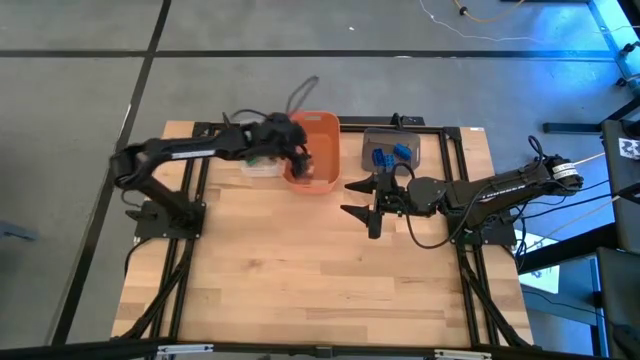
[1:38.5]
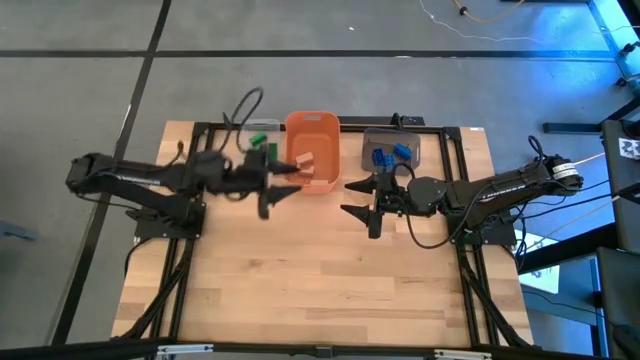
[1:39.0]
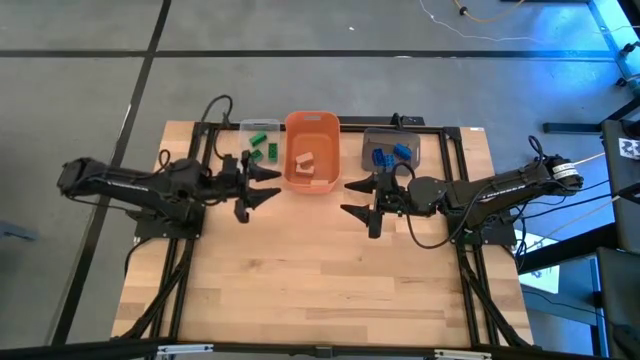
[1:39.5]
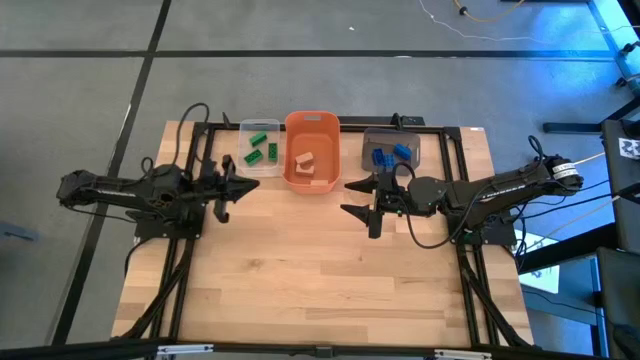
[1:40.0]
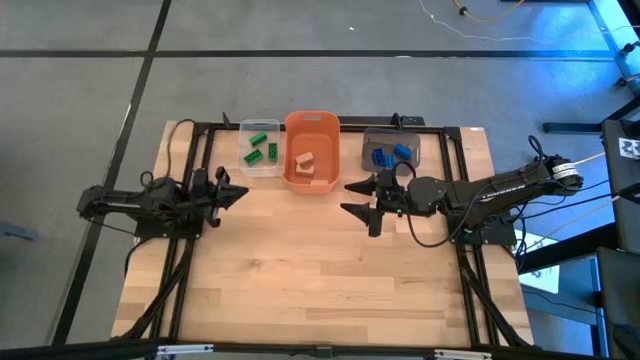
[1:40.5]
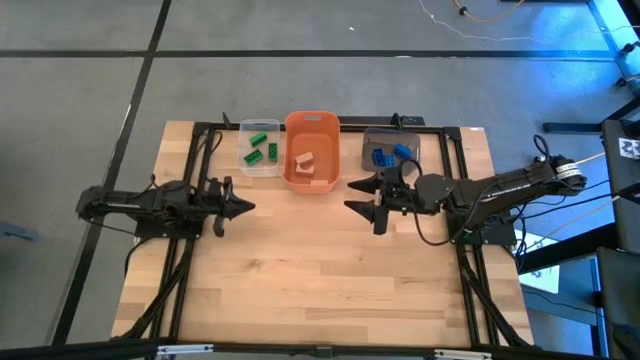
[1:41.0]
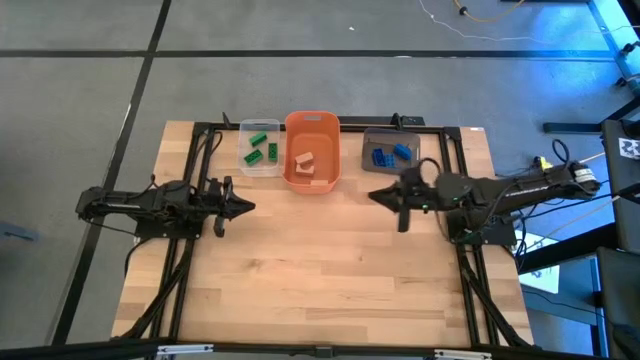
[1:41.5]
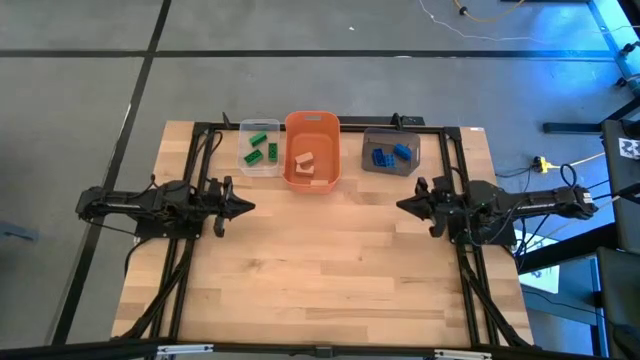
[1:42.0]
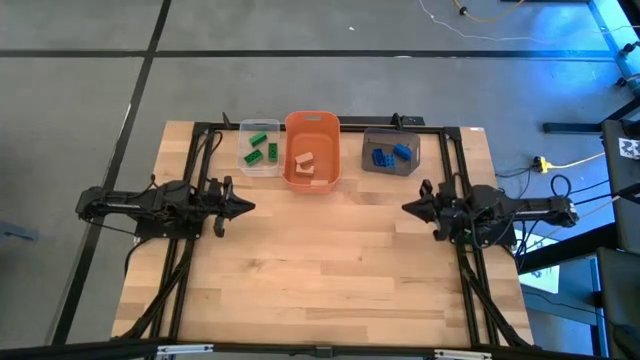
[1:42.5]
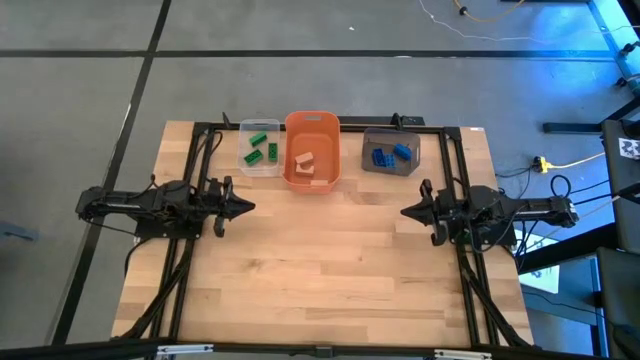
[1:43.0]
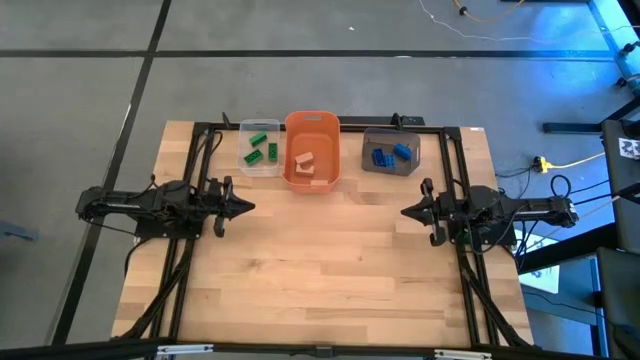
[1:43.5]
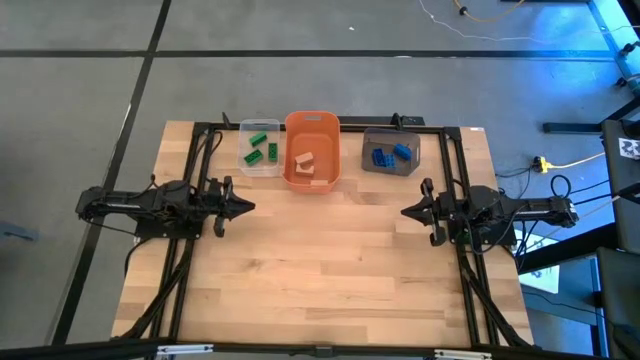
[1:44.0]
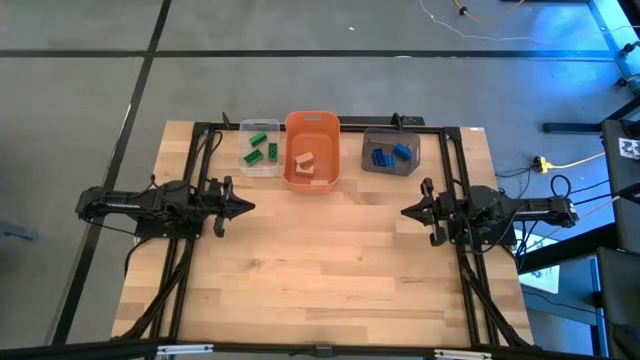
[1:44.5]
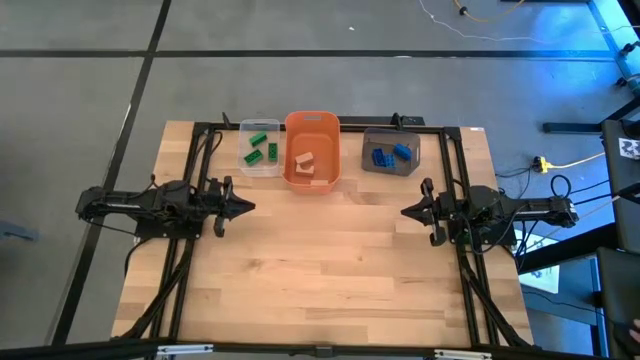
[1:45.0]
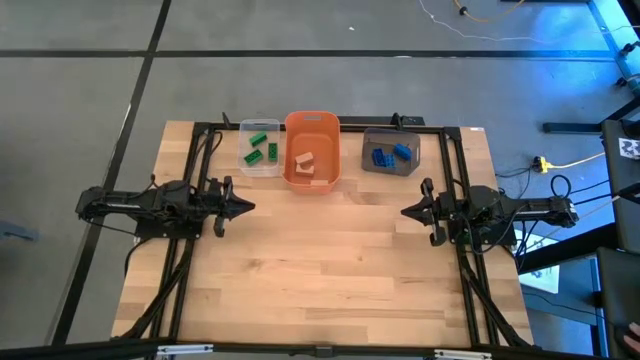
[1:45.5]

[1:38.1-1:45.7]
Task: Sort & place blocks by color
Return to Home Position

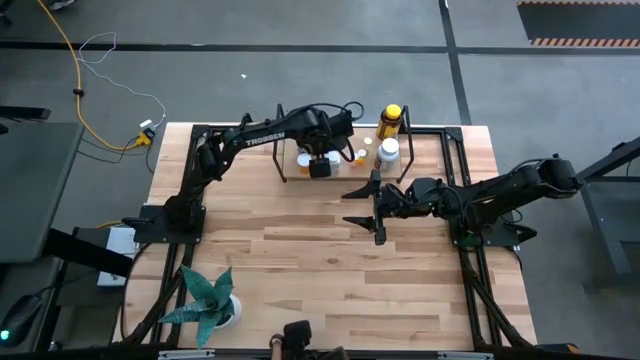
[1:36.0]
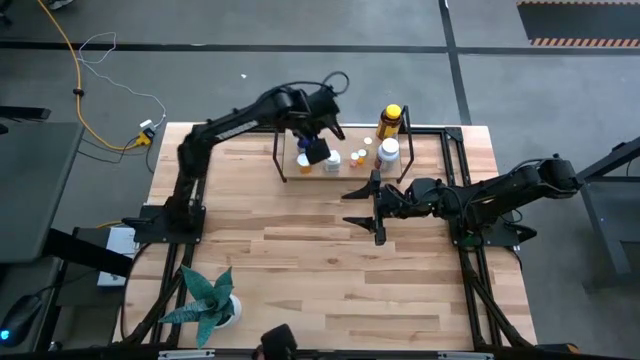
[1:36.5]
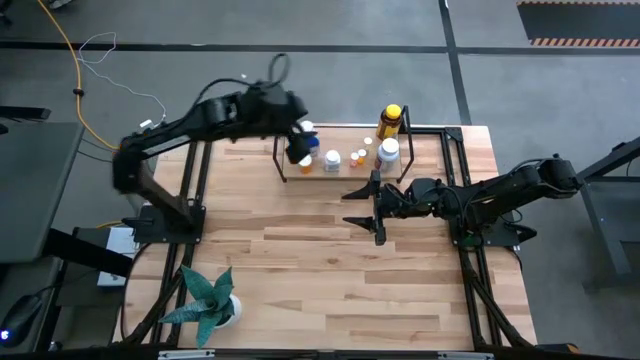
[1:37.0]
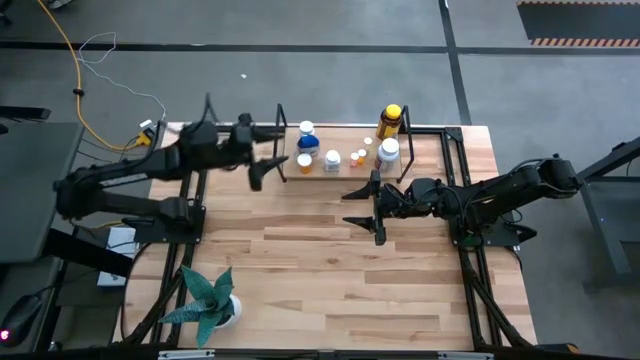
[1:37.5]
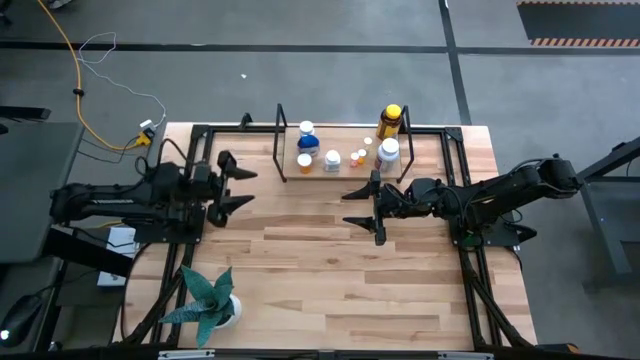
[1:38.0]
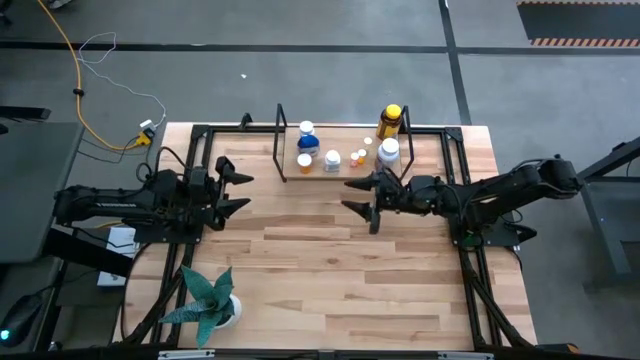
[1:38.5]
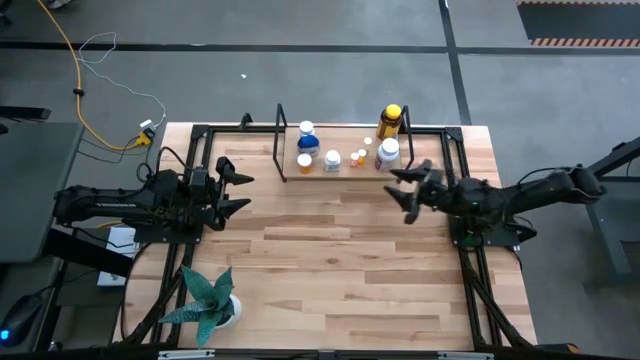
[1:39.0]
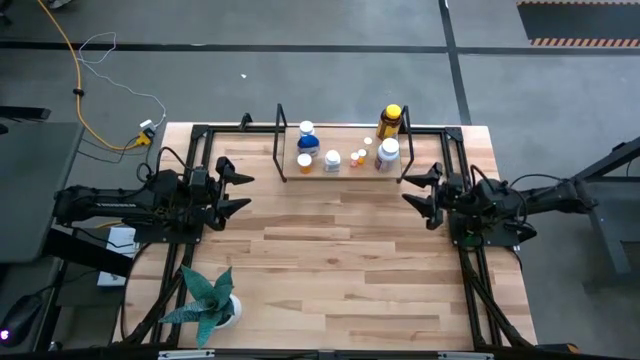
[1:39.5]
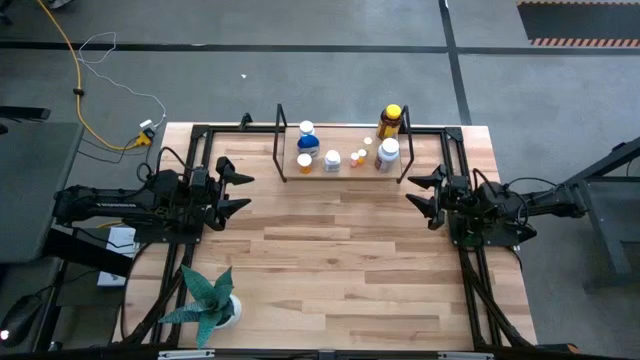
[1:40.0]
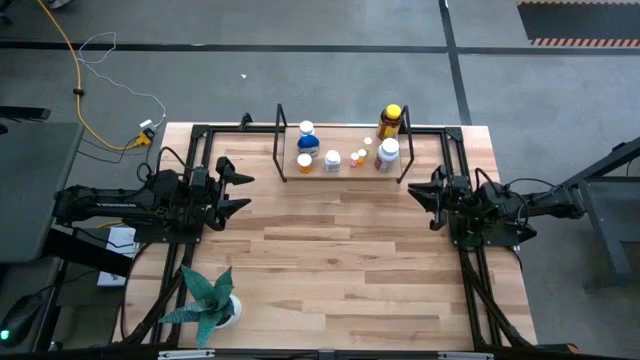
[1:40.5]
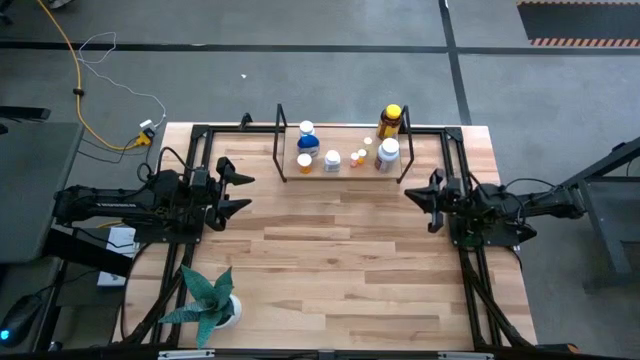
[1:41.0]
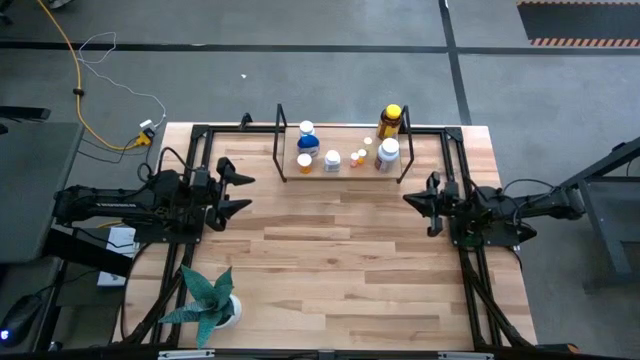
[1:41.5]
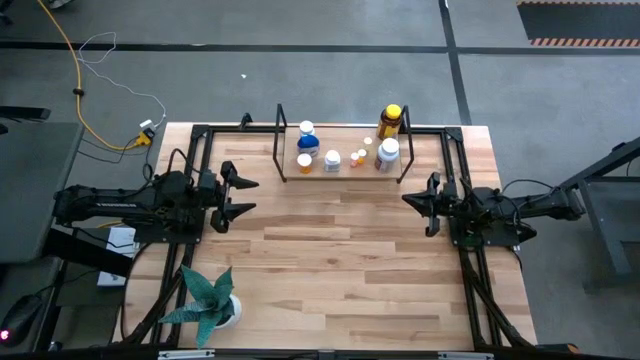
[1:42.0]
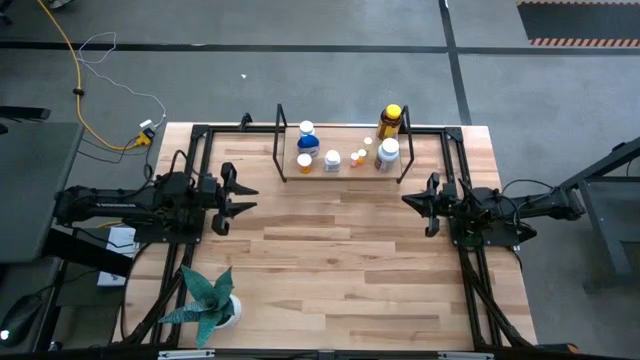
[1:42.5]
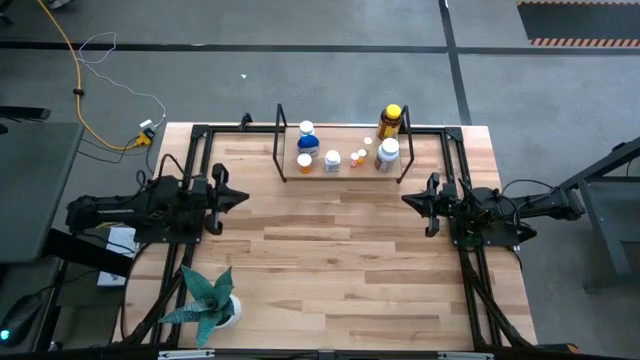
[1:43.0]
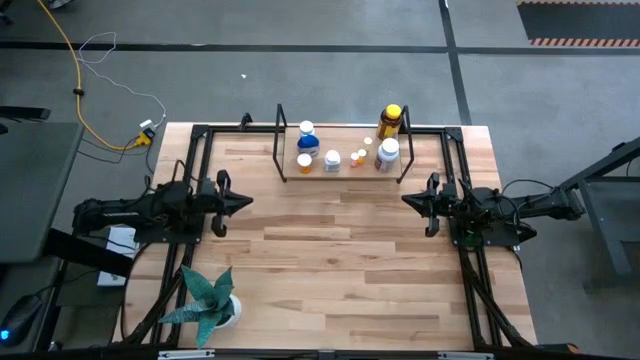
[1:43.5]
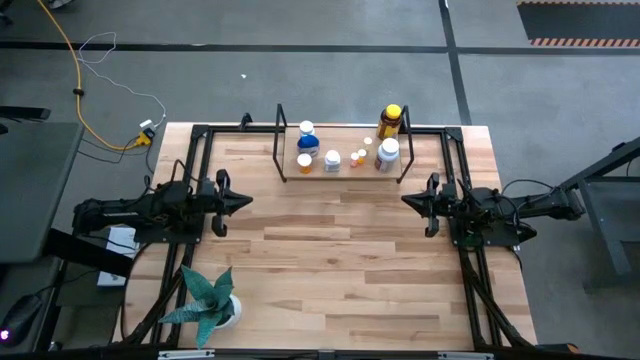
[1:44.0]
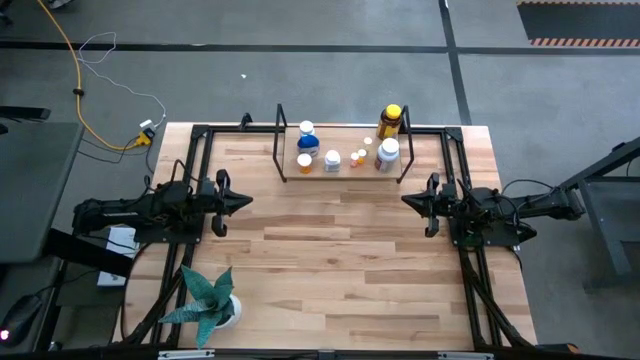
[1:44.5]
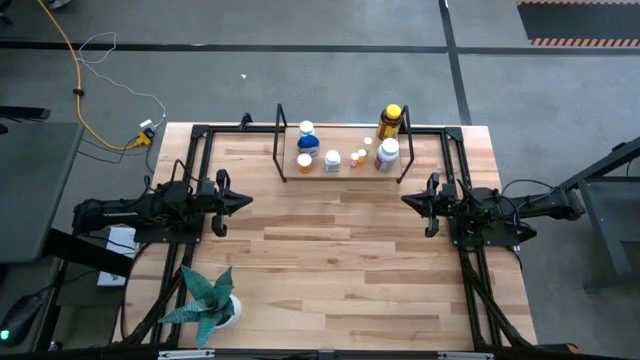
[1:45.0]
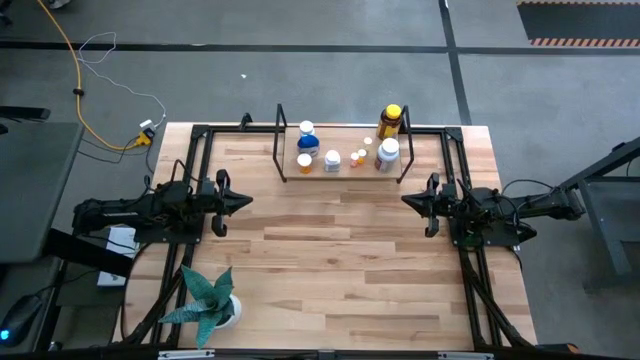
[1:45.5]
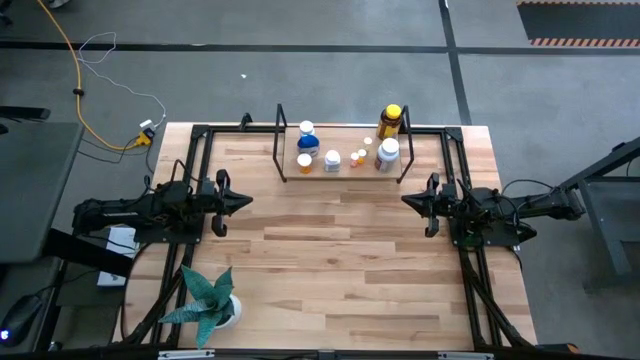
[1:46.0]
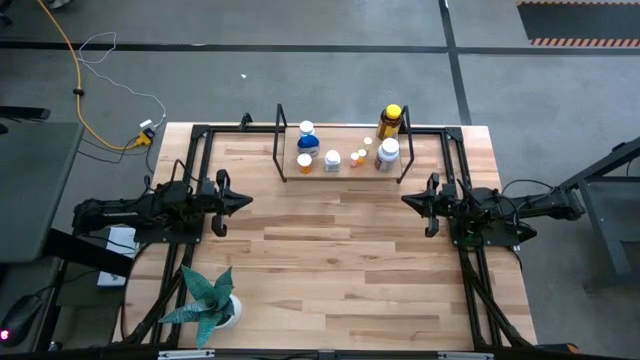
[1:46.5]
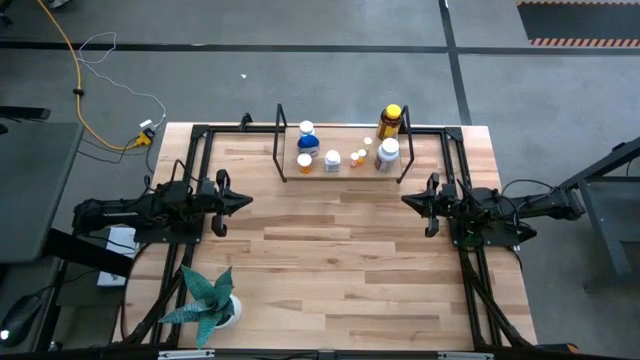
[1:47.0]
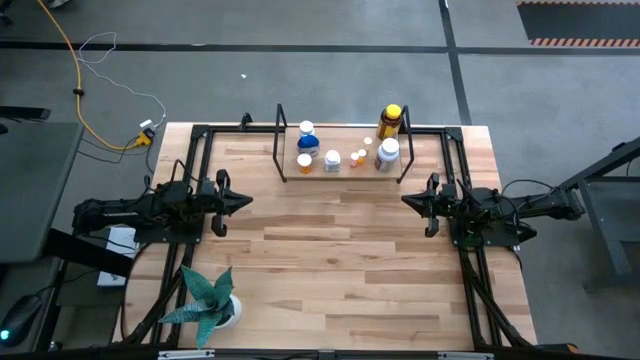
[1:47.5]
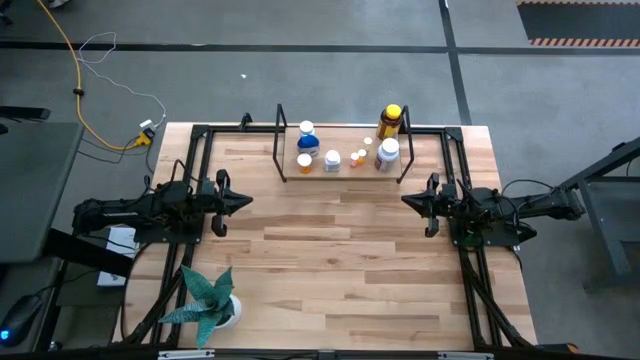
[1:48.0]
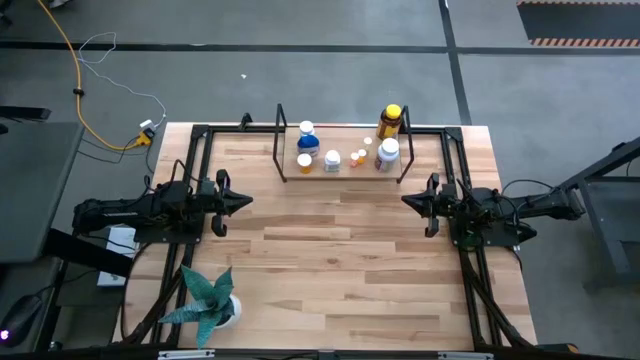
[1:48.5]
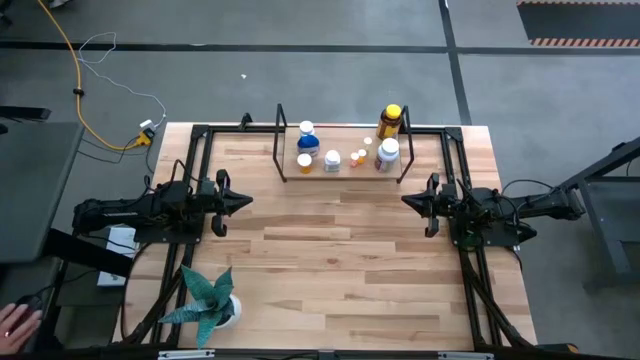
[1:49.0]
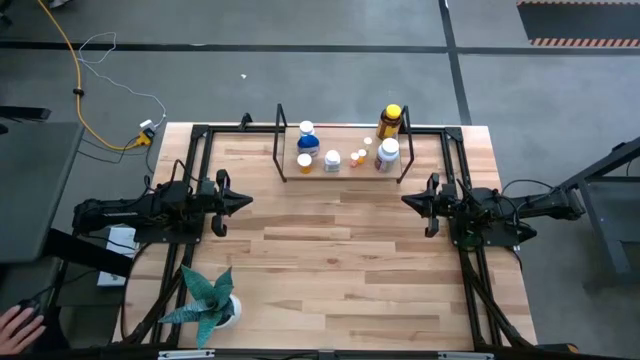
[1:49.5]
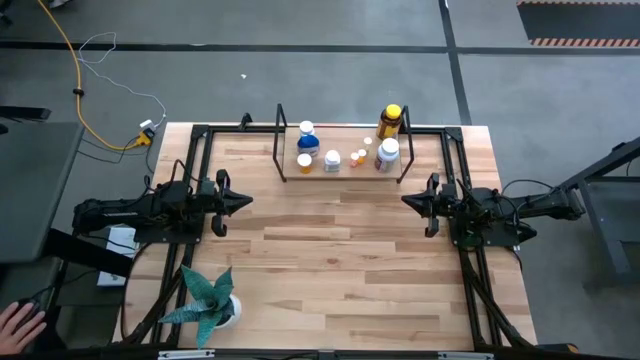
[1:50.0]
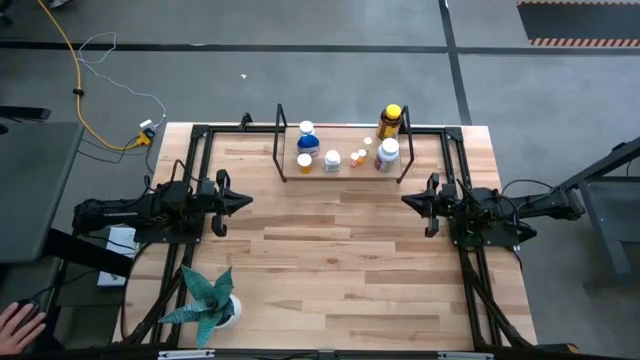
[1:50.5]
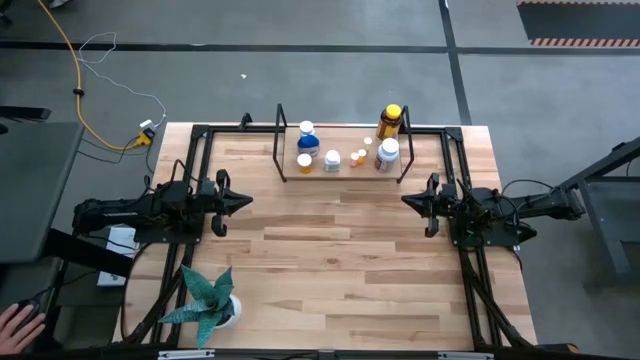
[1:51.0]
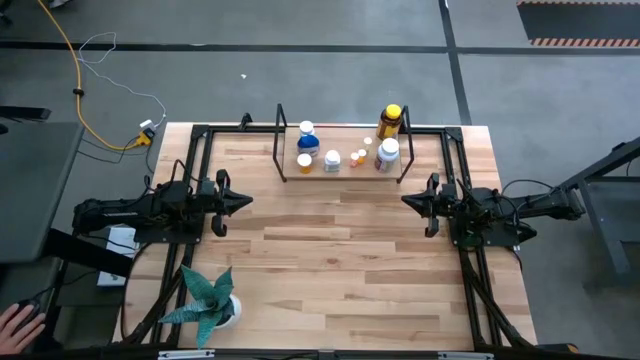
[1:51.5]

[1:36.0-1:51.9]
Task: Pick and place medicine bottles onto shelf by color
Return to Home Position
